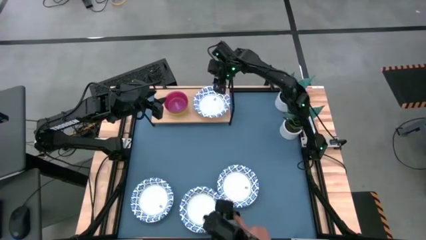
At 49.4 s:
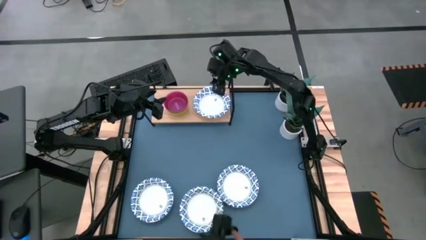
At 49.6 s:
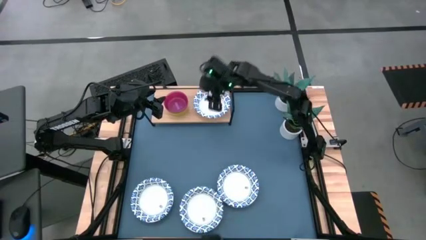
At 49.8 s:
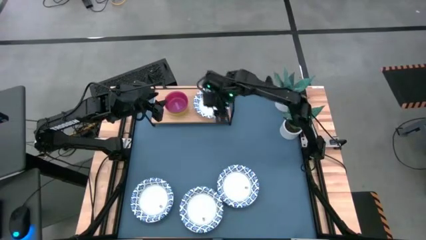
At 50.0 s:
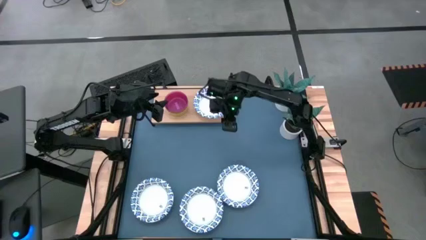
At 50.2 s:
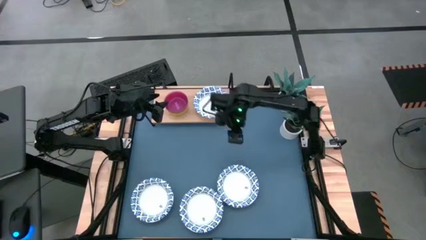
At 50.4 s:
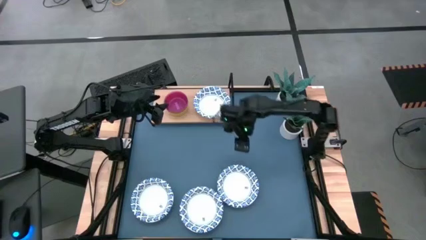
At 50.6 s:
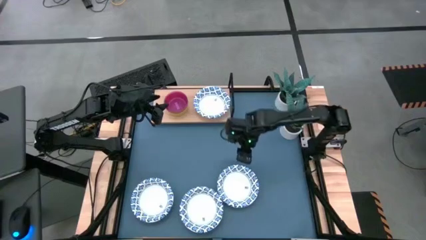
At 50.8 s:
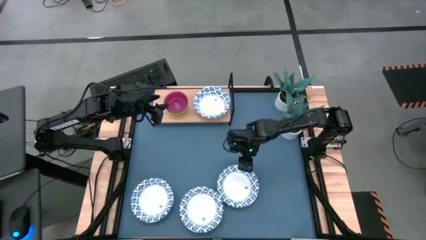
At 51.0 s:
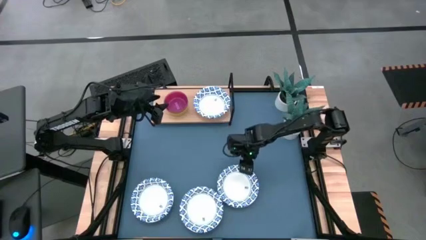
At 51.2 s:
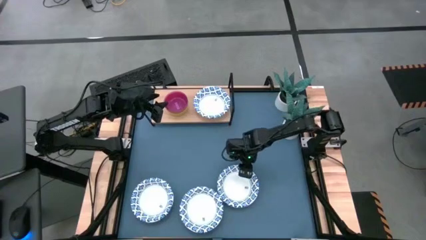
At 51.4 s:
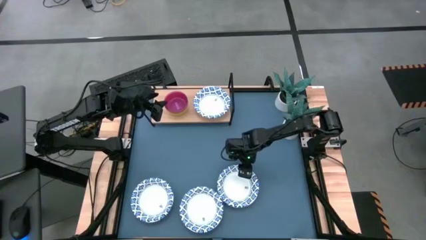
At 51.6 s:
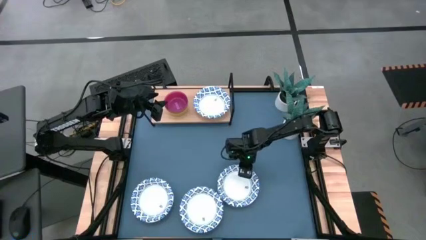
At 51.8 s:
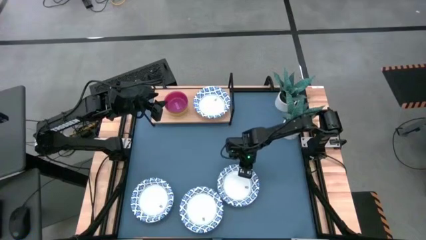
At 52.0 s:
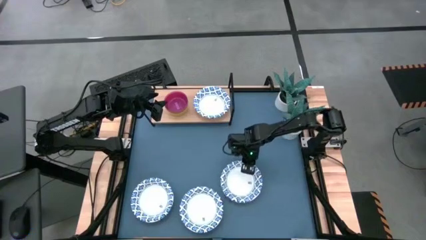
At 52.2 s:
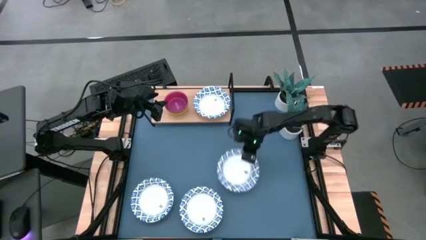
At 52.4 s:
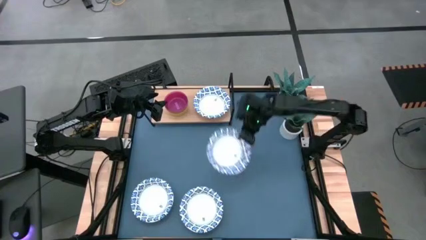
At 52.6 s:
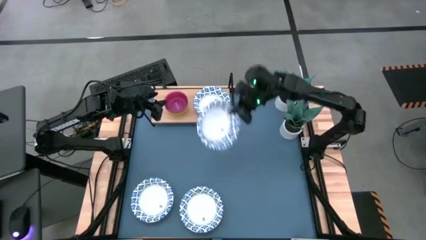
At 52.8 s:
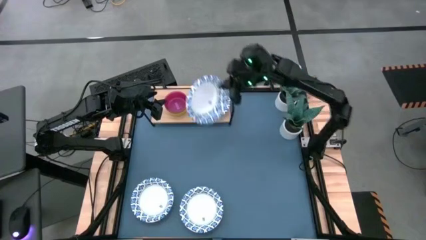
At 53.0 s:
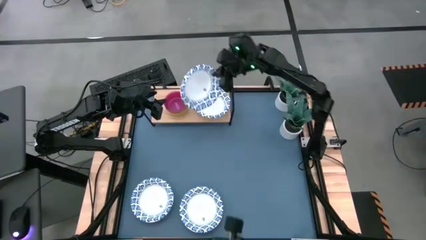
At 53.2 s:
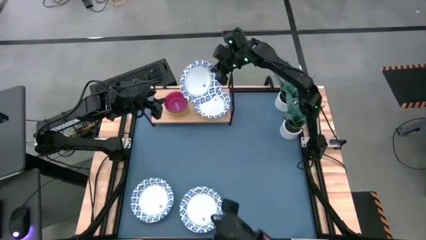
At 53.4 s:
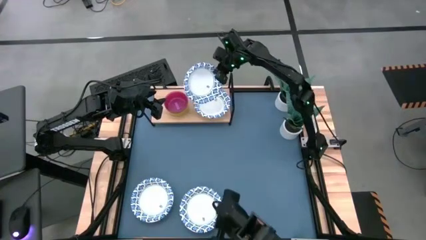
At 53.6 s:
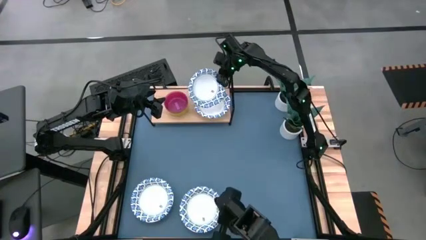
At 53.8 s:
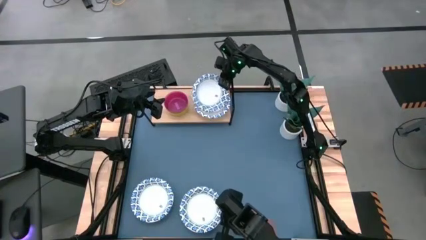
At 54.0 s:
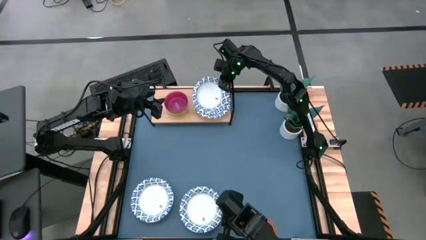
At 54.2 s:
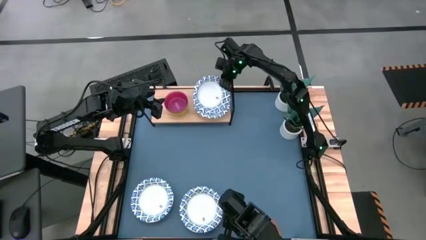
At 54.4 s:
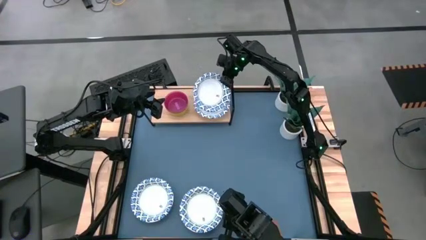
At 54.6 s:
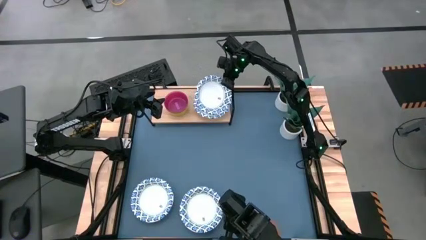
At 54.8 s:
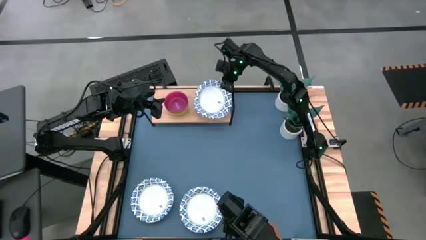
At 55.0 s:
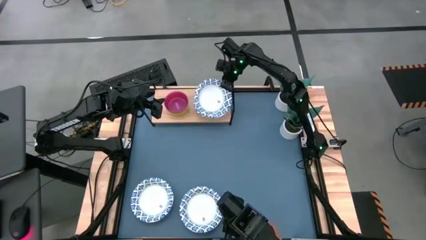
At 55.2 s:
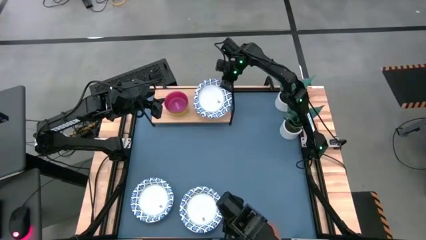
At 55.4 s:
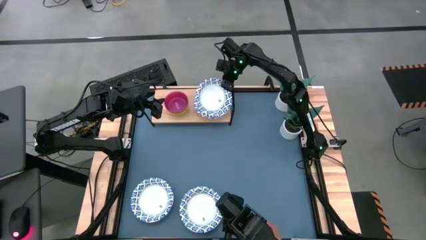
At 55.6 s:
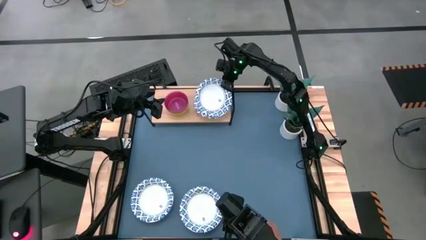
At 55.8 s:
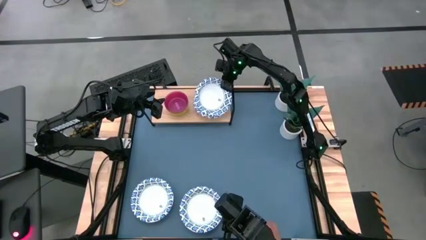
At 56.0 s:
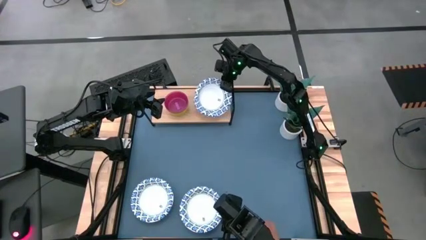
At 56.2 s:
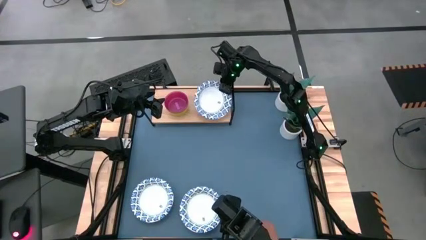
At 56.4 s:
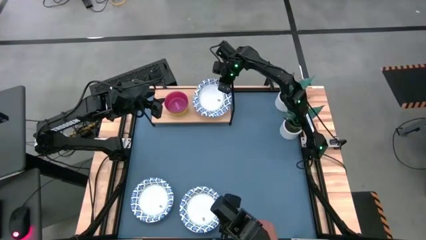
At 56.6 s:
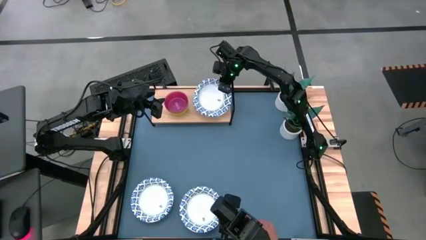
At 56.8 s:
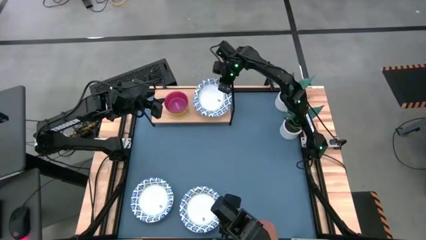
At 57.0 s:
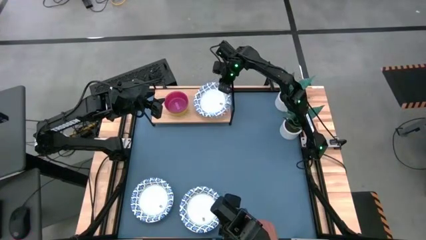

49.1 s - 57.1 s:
Task: Place and stack bowls onto a shelf
Stack the white bowl on top of the other white bowl on the shelf

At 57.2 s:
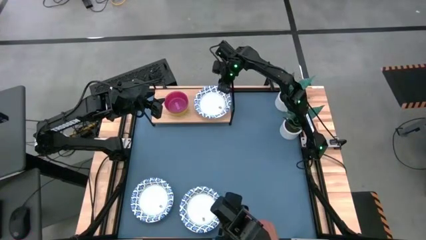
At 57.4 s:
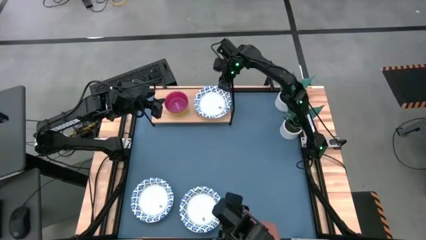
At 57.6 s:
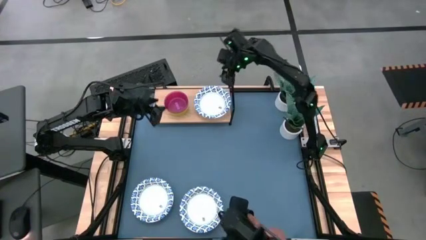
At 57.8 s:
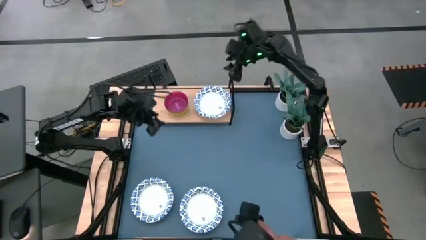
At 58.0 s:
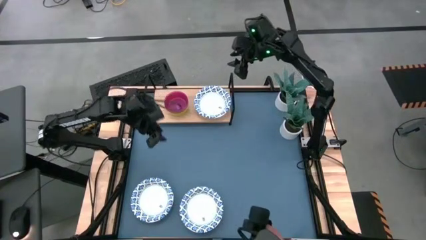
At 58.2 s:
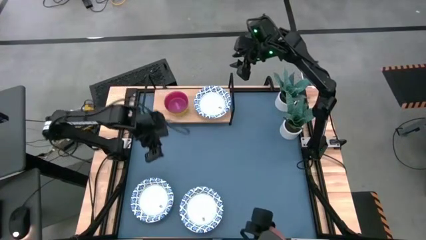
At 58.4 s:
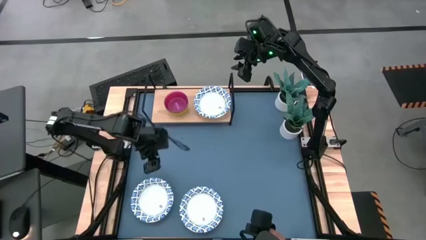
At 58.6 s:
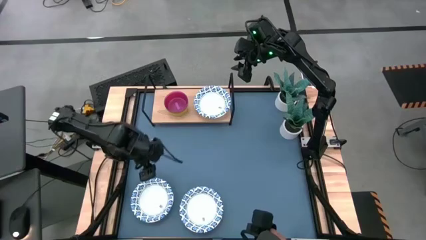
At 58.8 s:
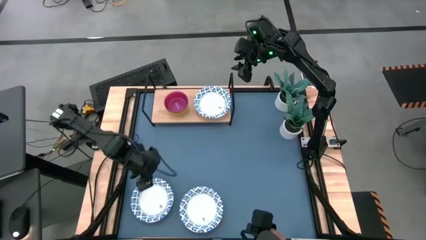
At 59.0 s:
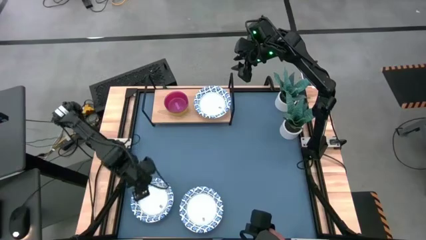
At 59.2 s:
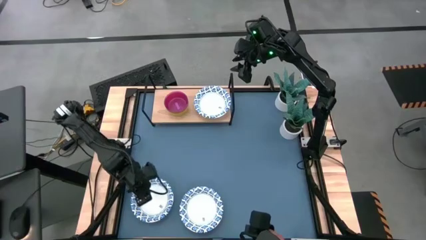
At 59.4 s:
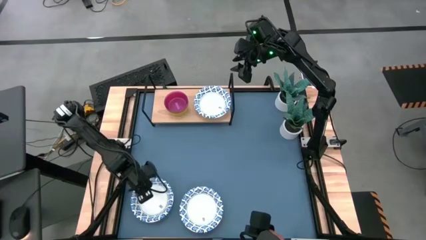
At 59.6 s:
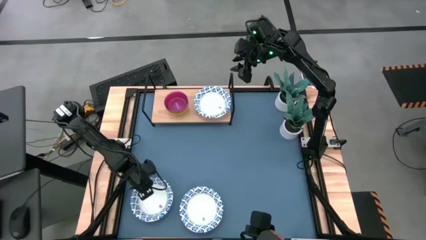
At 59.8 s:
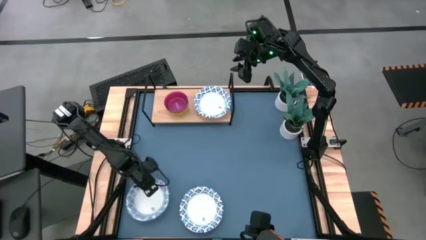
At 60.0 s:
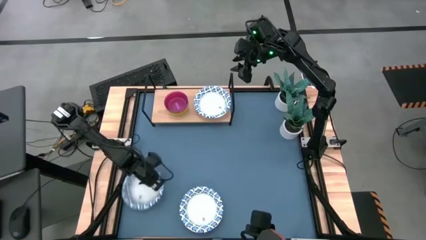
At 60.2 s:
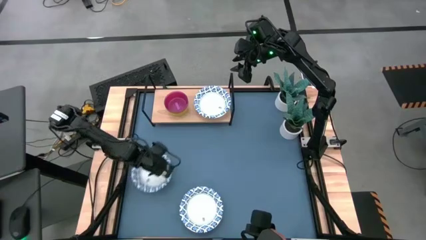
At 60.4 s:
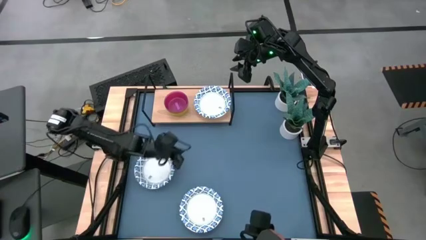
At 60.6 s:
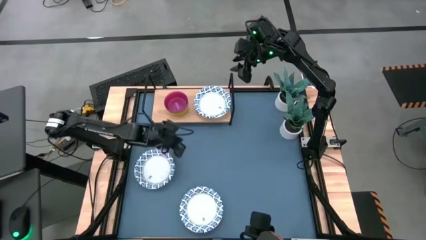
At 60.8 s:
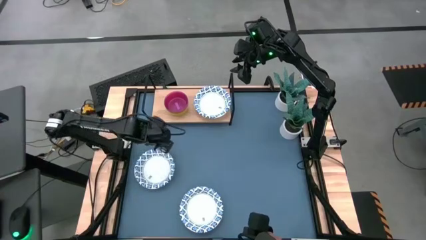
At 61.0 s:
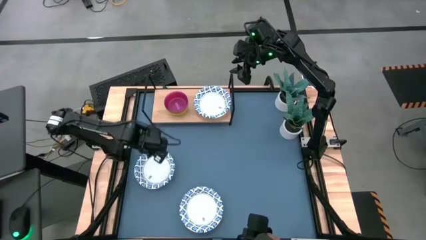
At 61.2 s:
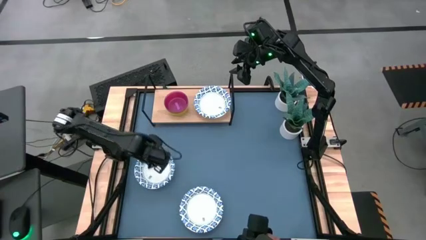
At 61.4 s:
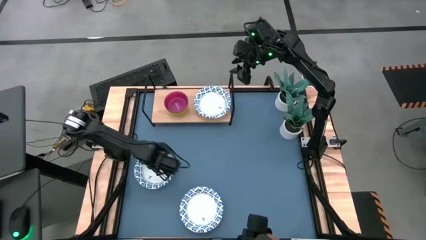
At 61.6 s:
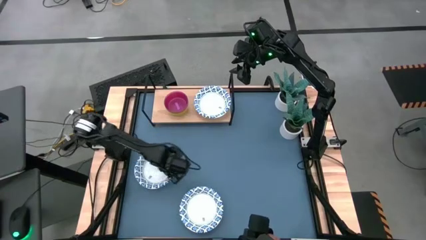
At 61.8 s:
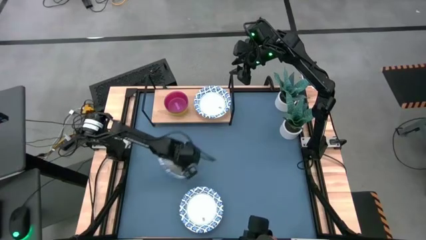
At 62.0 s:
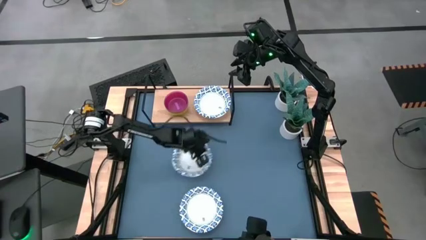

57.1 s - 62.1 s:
Stack the white bowl on top of the other white bowl on the shelf

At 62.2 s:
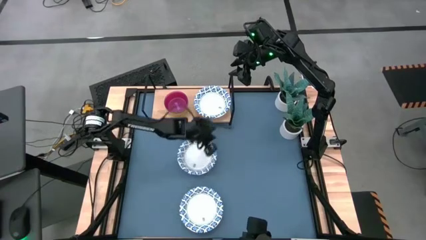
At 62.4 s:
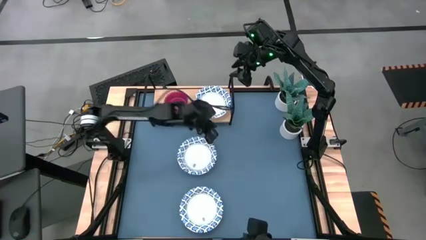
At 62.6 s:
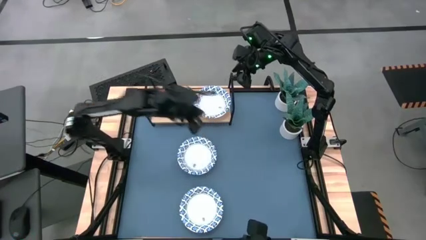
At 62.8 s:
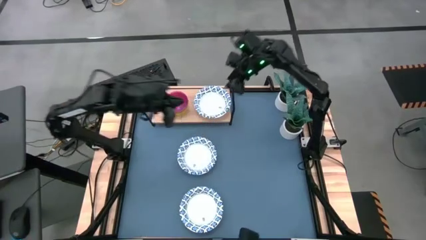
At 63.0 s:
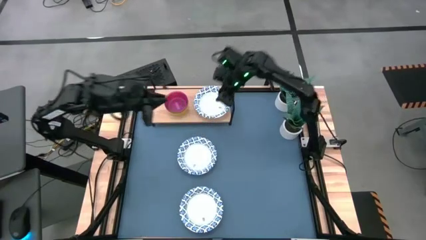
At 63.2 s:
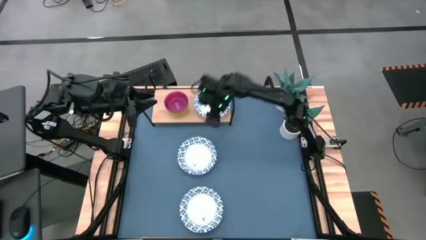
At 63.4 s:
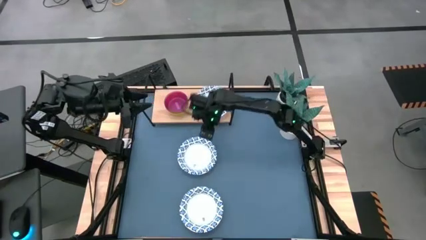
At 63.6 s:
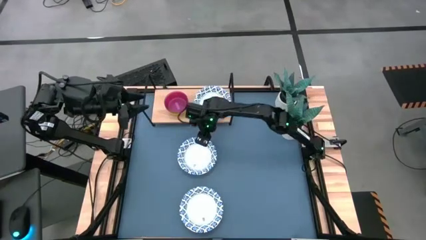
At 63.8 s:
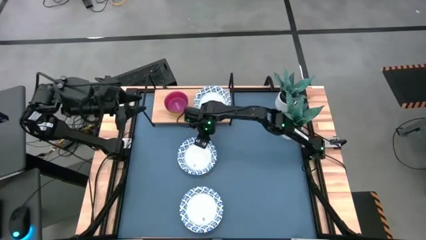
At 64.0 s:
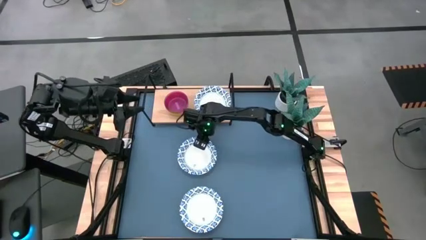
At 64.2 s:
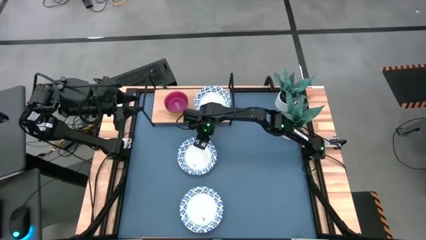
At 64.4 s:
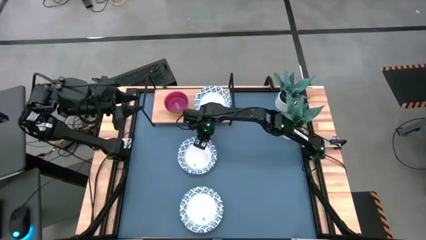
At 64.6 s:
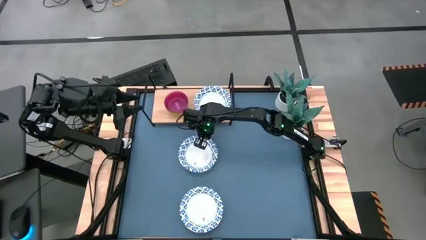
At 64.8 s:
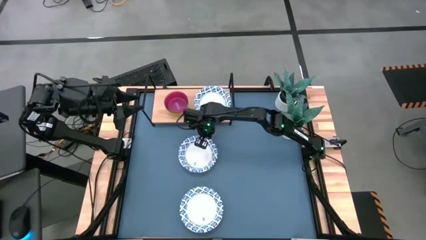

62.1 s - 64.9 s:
Stack the white bowl on top of the other white bowl on the shelf
